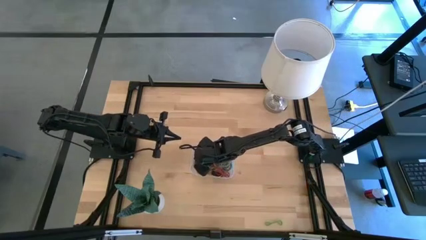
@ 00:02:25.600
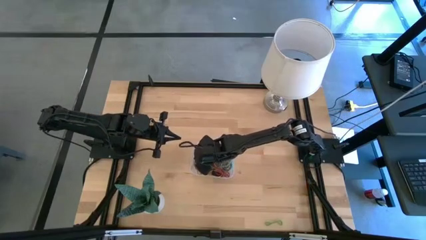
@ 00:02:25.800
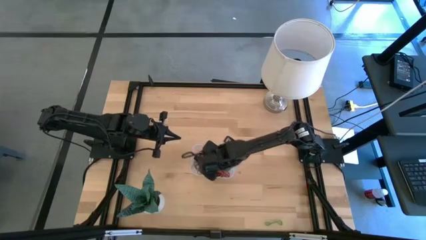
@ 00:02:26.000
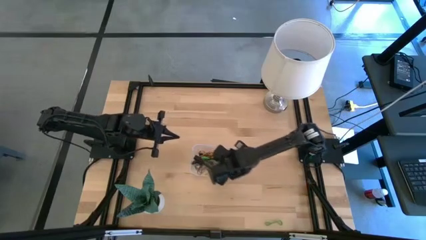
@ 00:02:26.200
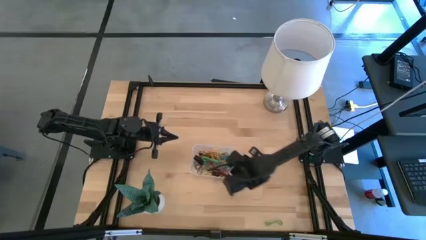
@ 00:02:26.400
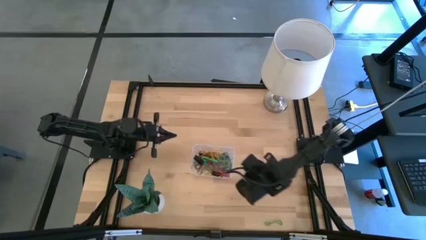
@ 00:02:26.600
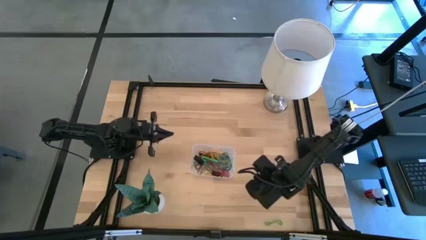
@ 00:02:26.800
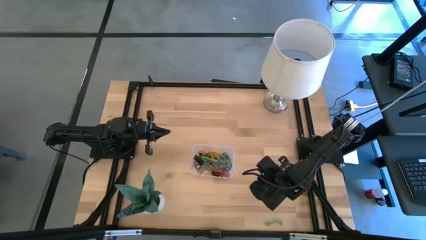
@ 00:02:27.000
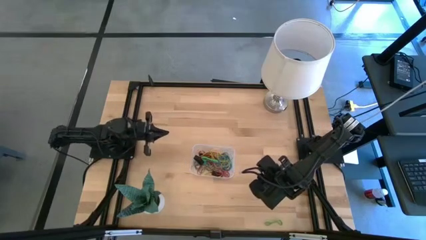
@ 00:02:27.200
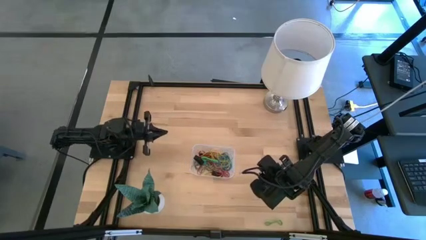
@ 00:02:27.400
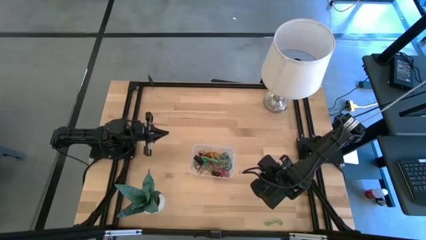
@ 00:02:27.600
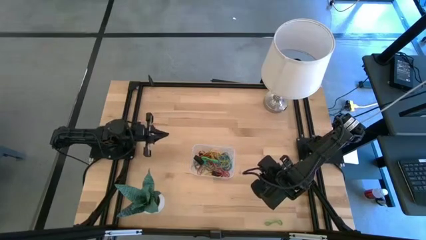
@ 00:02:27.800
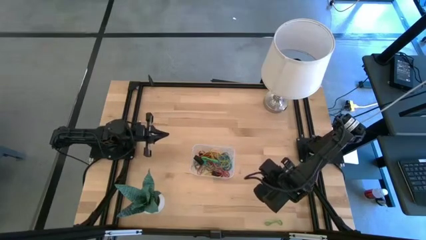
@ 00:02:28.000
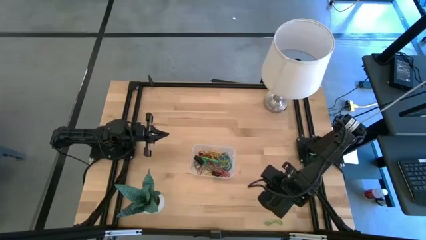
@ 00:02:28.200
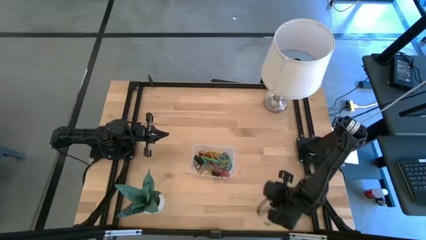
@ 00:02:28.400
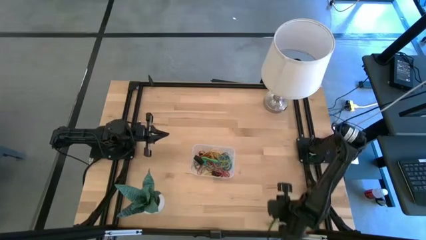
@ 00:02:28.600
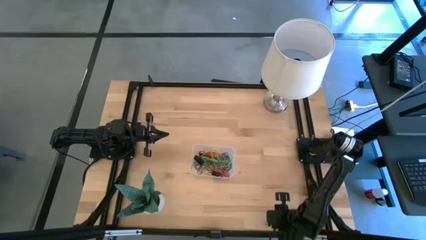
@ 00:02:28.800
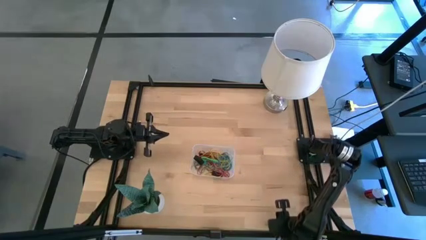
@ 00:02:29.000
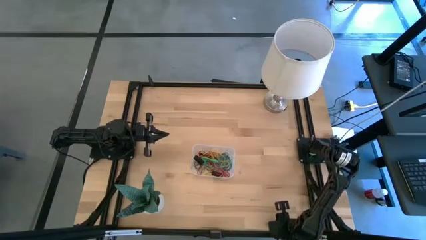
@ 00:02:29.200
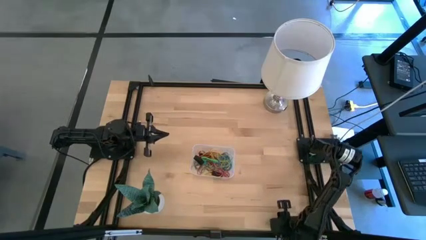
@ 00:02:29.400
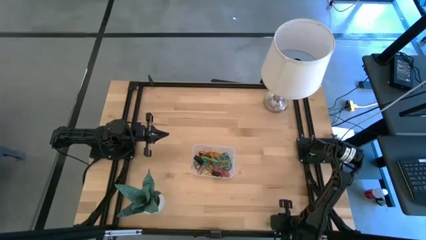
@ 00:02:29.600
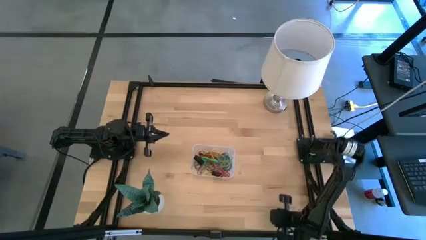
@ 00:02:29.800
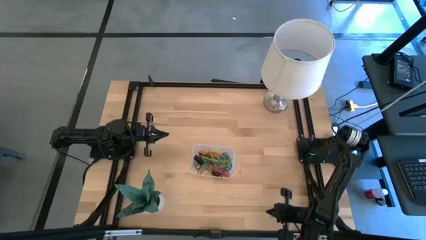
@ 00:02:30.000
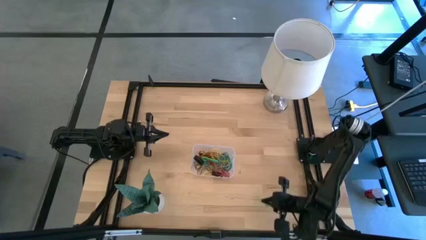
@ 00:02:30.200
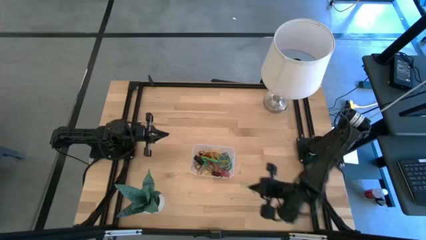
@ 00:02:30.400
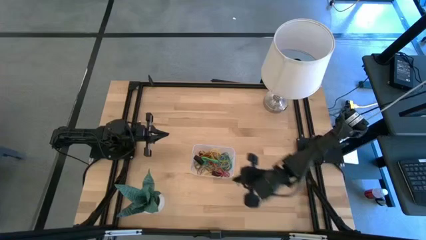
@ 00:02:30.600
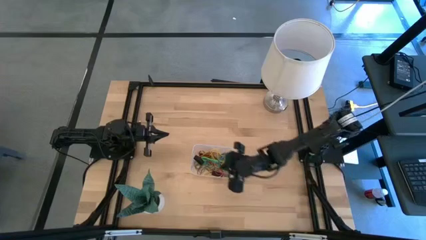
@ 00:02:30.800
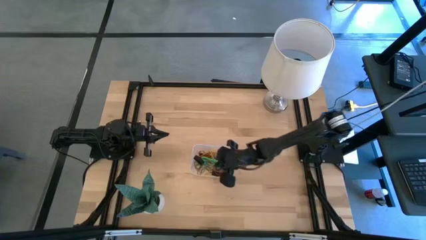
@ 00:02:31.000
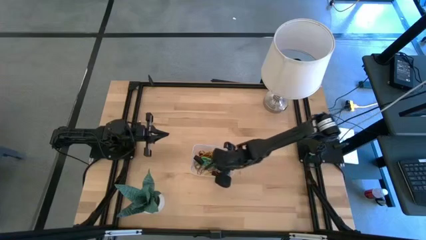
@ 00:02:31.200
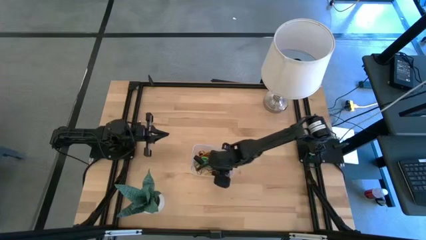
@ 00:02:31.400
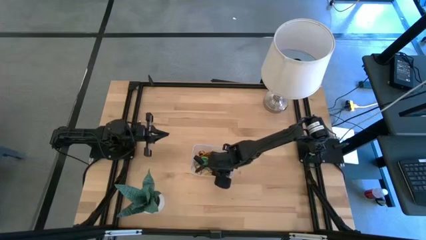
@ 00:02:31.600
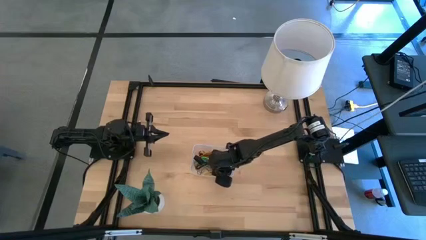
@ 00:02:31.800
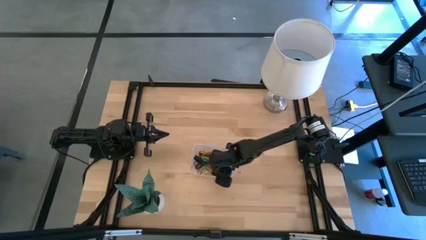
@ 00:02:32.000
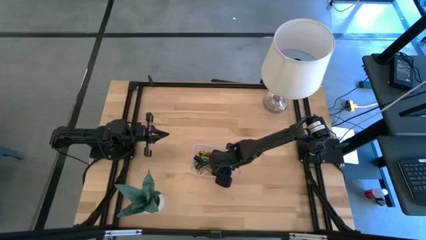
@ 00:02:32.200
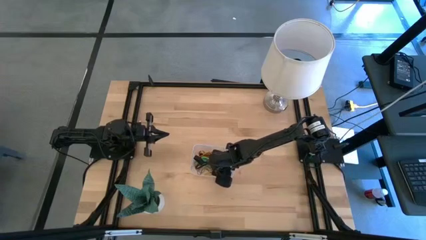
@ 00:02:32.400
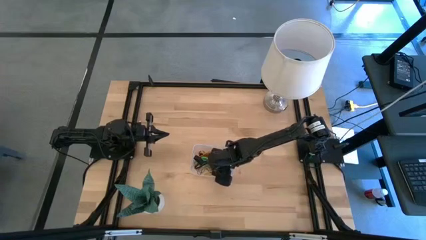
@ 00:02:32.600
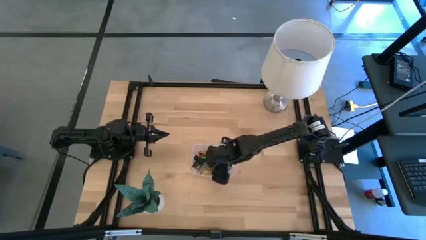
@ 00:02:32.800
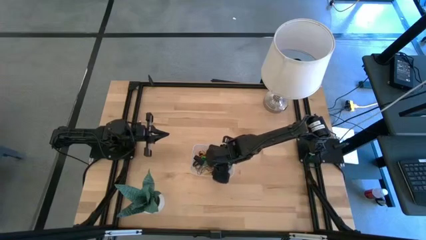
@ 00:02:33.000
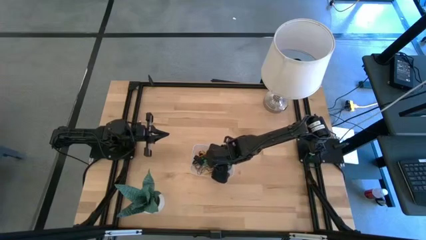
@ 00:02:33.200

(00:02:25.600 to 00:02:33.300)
Task: Pick and place rubber bands into bin
Put the green rubber band into the transparent bin

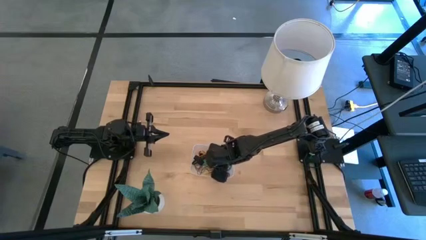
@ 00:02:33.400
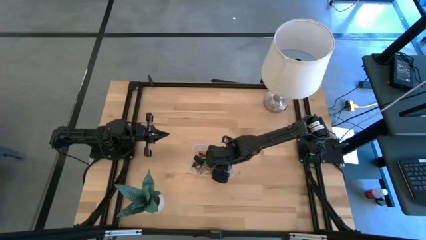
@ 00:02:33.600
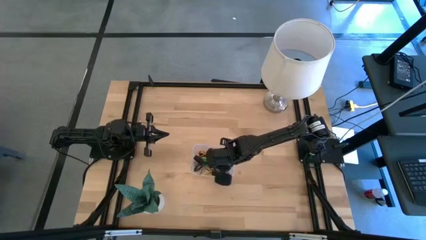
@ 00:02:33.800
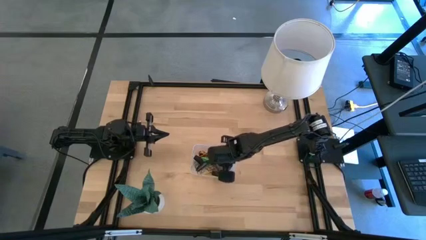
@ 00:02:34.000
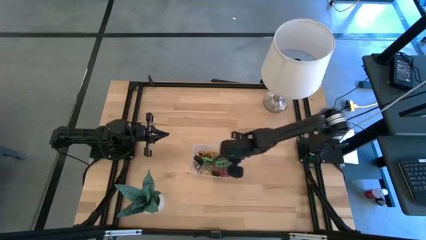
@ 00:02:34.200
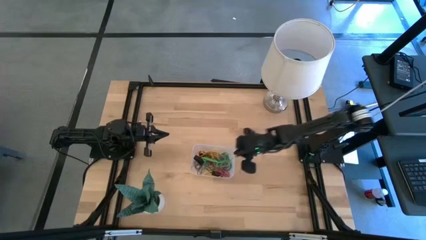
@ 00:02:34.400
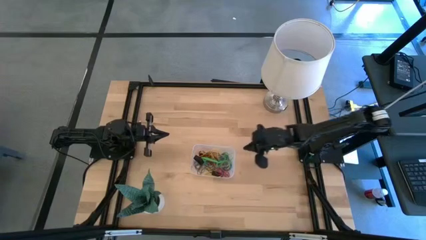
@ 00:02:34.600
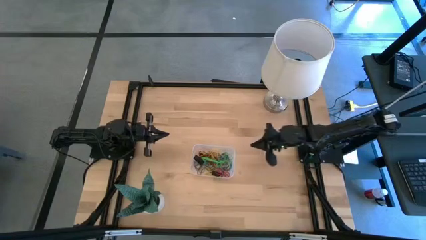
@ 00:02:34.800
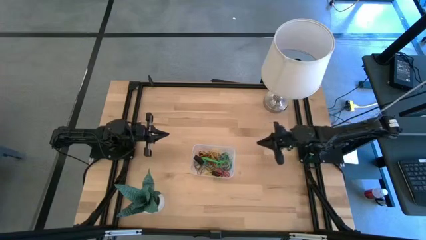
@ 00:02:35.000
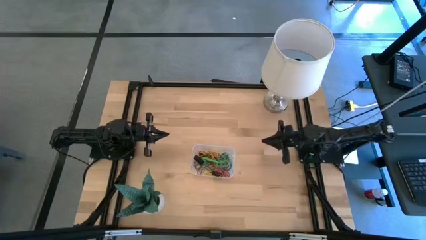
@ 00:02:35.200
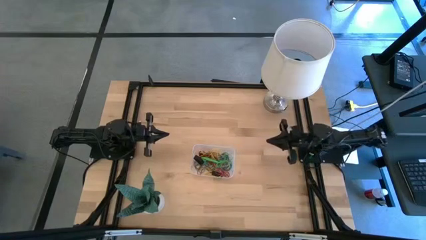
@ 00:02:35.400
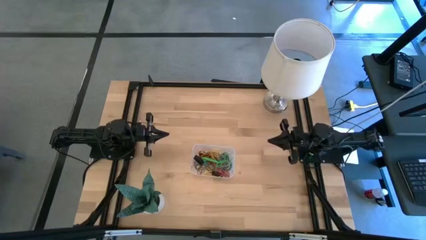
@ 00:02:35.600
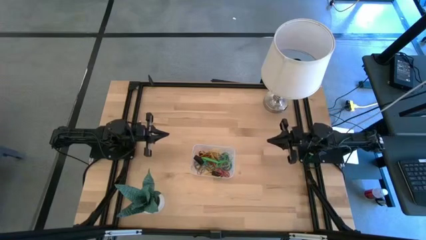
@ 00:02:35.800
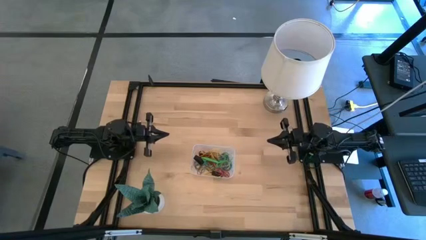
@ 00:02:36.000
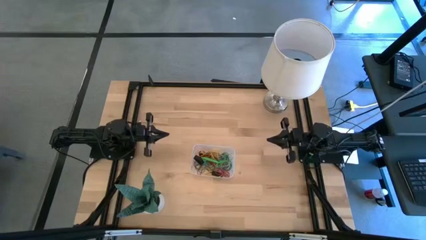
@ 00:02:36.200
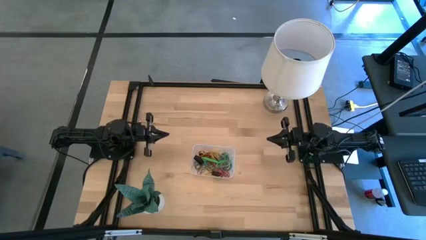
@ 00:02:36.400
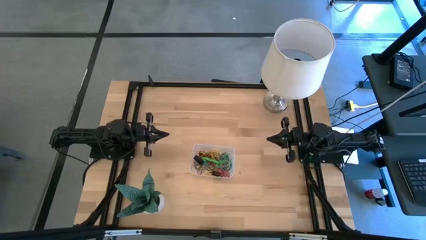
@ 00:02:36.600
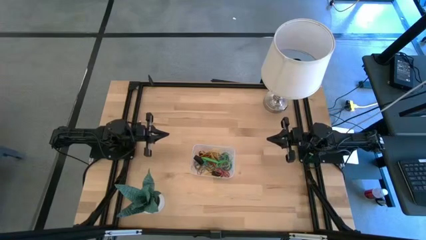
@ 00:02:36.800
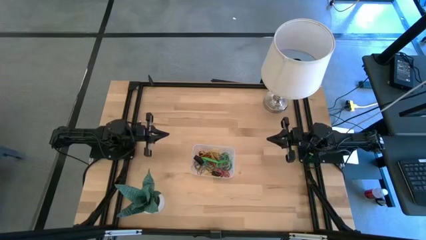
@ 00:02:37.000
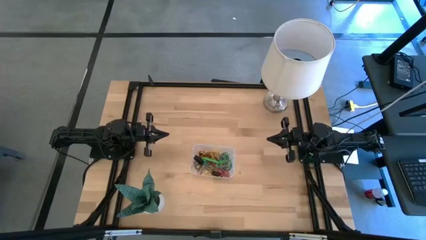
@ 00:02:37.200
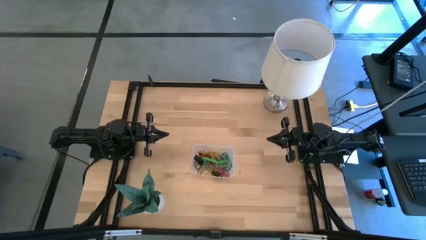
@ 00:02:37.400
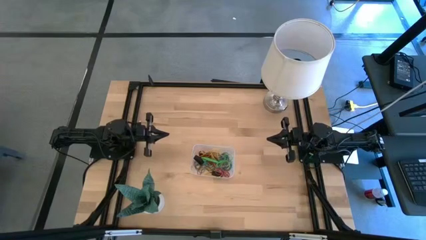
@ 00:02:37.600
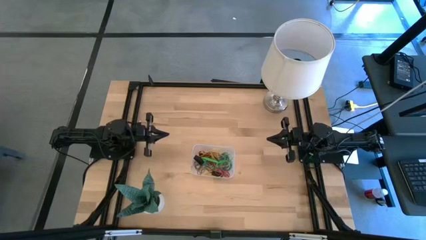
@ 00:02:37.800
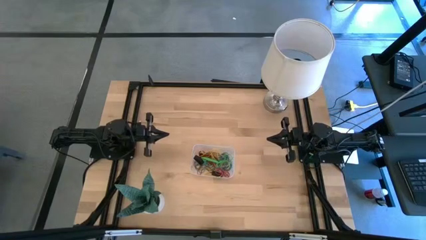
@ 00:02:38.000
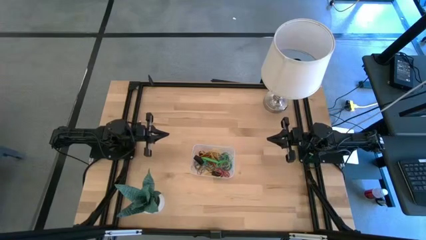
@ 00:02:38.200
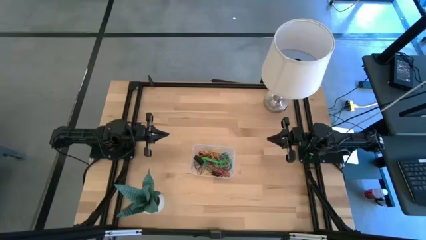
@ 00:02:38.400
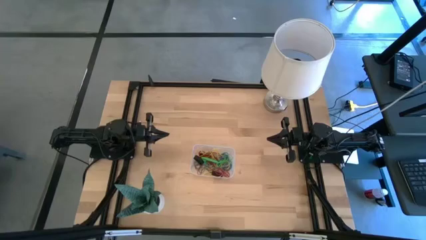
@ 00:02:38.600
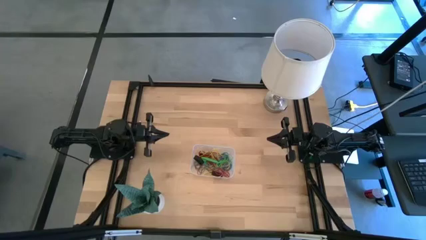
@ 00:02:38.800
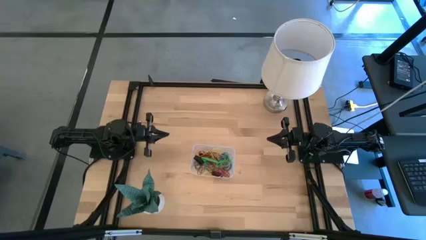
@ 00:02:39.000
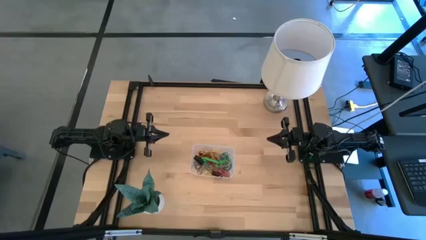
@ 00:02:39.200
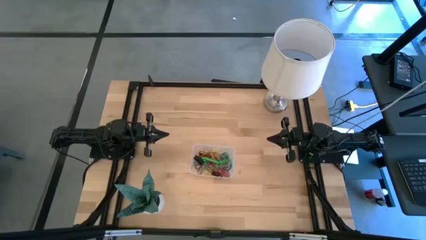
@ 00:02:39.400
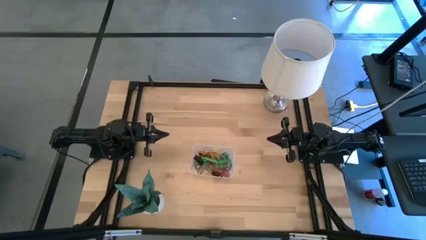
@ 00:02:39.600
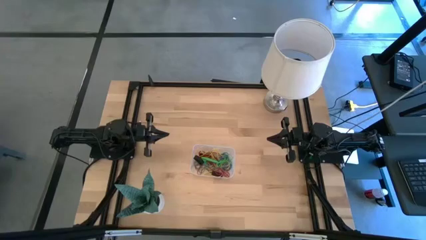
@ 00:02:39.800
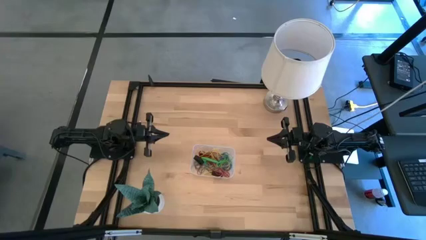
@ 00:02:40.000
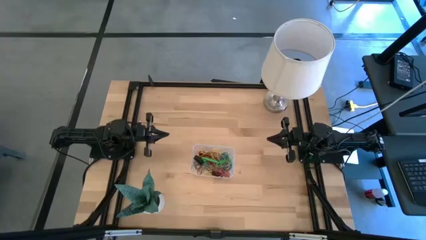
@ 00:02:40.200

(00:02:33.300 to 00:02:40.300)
Return to Home Position
